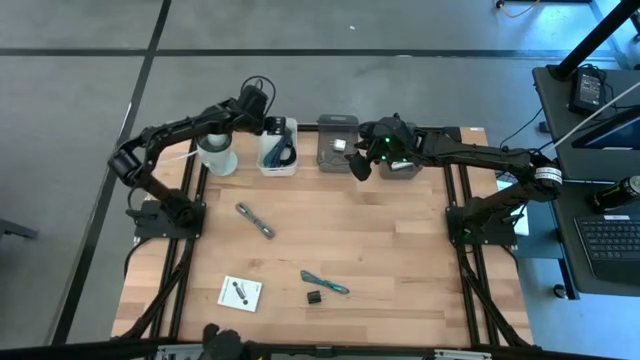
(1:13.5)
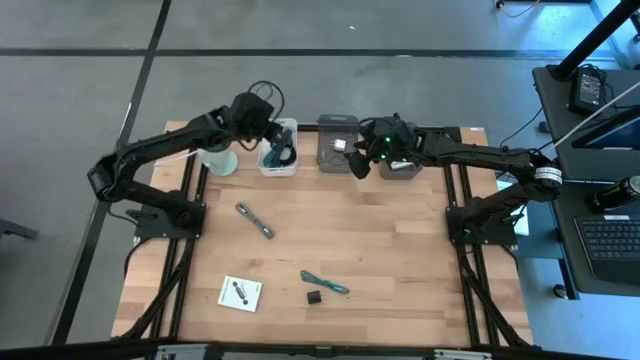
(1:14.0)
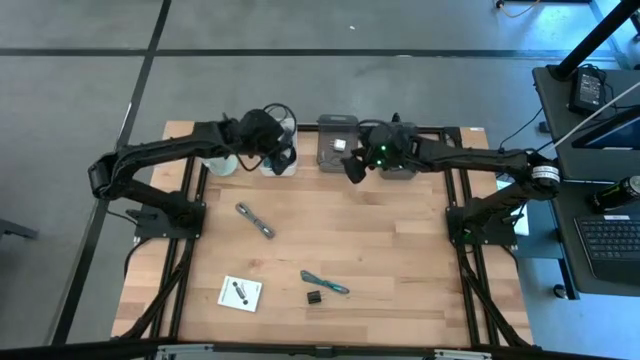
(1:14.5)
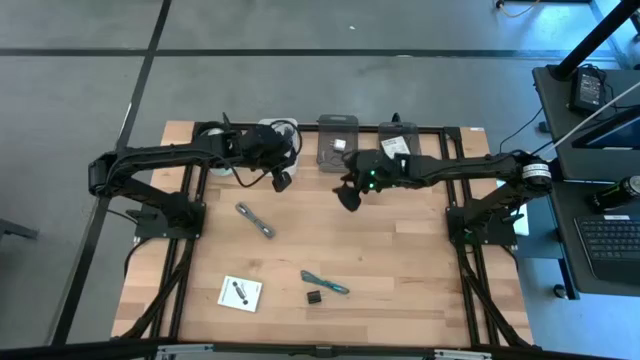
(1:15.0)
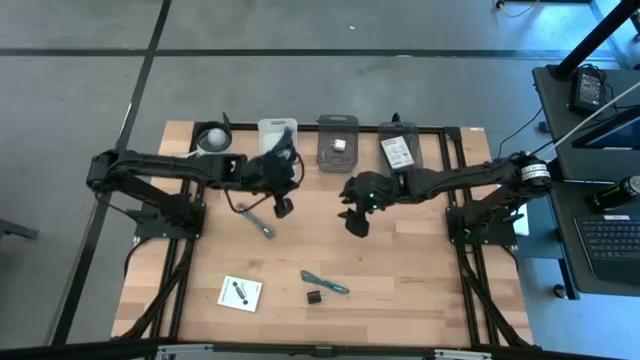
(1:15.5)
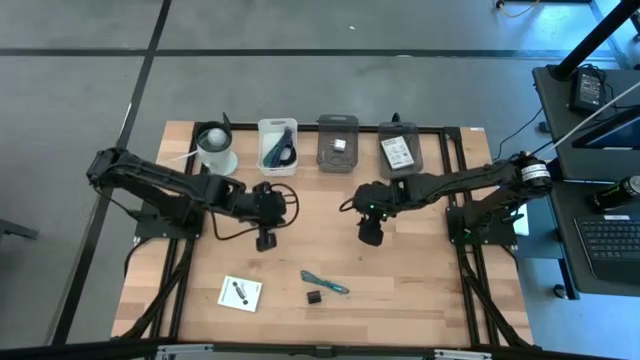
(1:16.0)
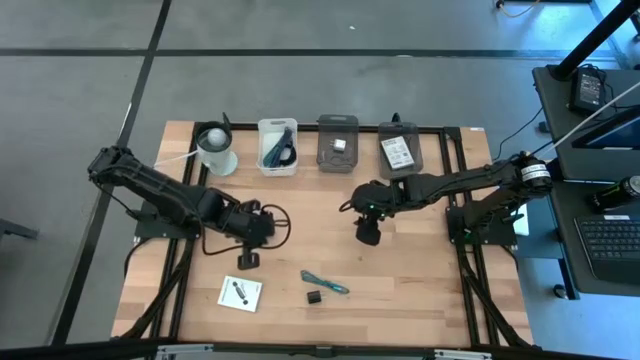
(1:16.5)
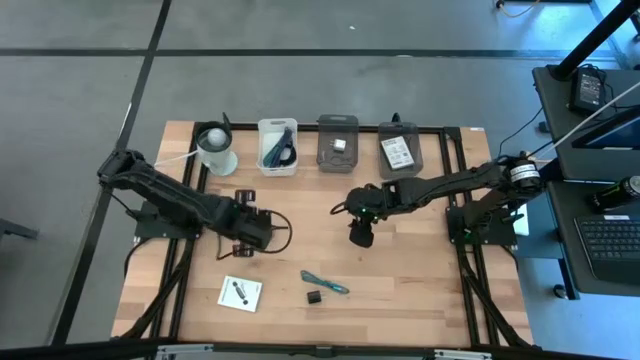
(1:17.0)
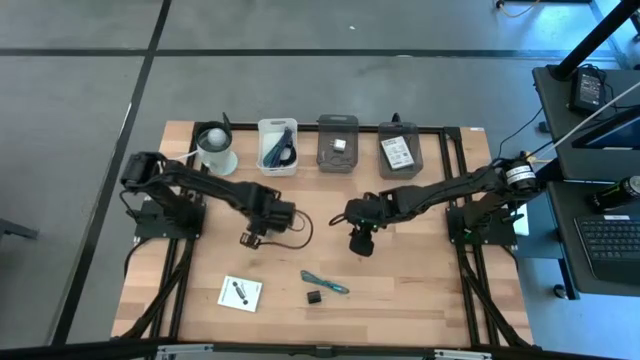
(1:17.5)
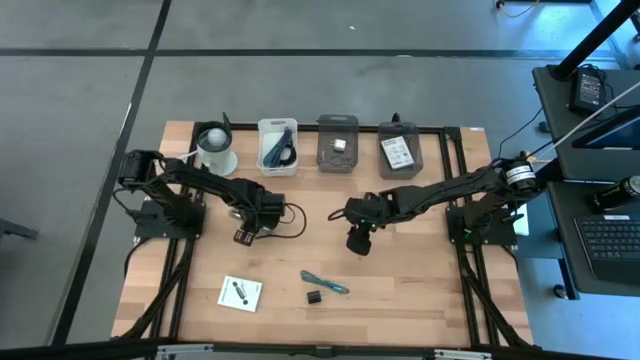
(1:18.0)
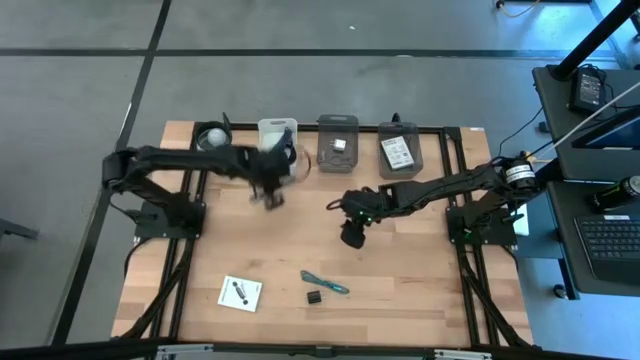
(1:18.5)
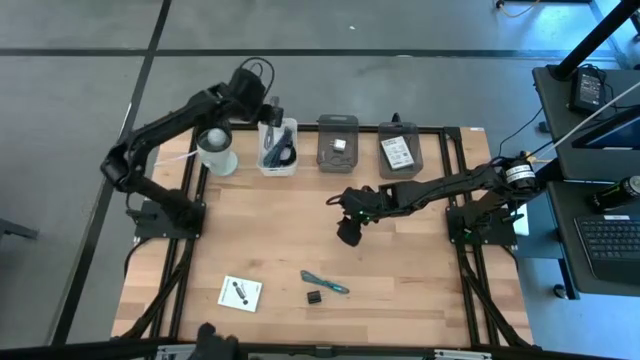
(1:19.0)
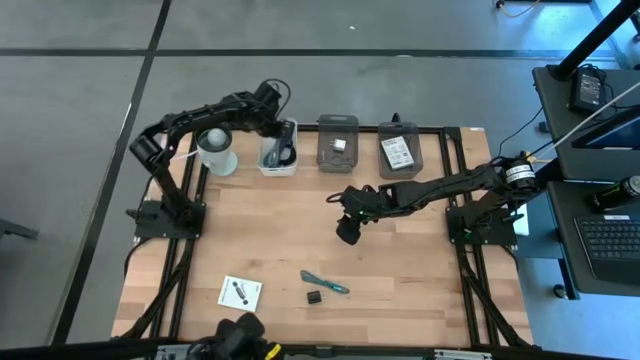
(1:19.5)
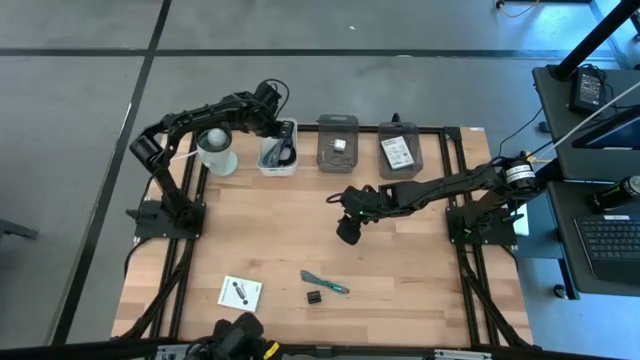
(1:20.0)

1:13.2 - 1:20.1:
Task: Pick and place items into bin
Put the white patterned charger cable into the white bin

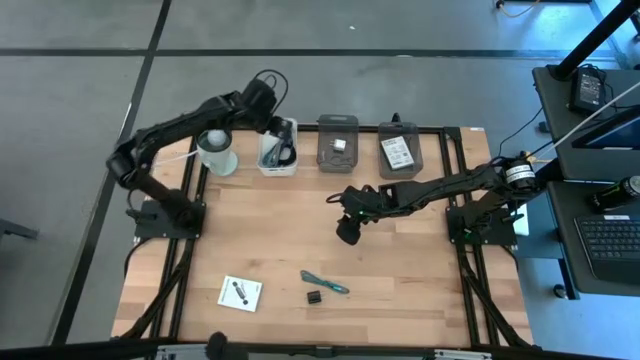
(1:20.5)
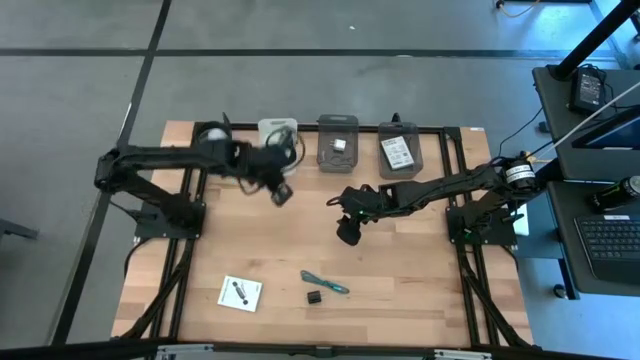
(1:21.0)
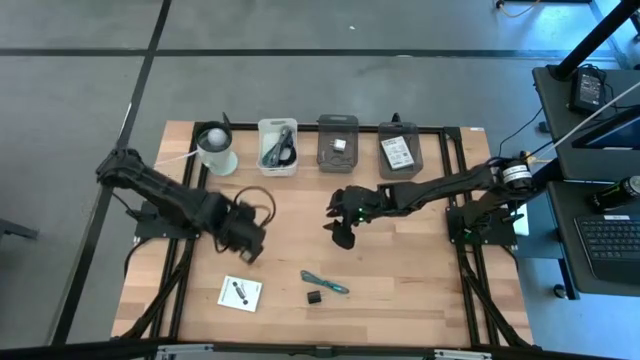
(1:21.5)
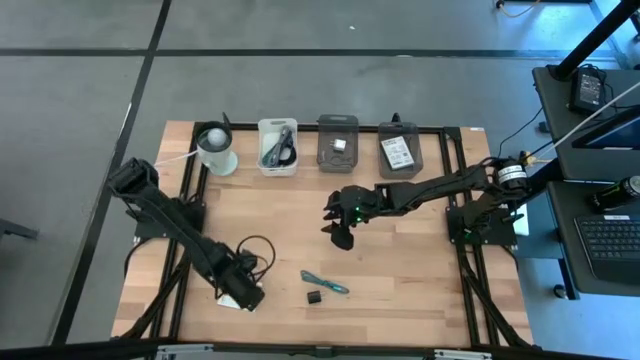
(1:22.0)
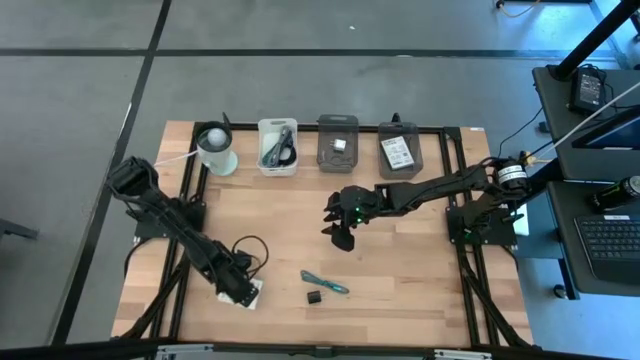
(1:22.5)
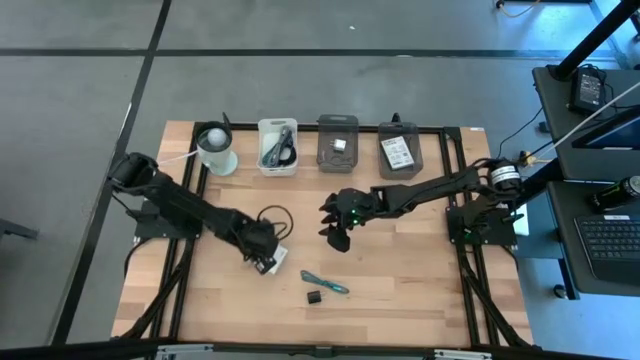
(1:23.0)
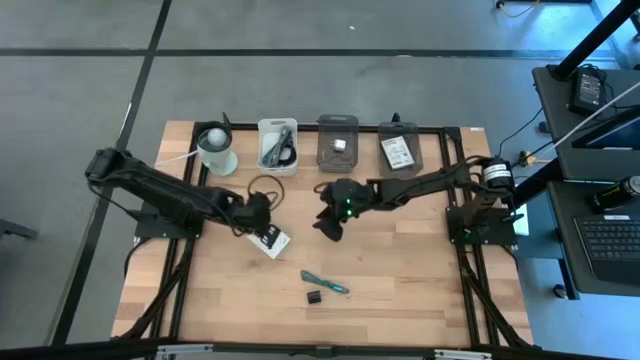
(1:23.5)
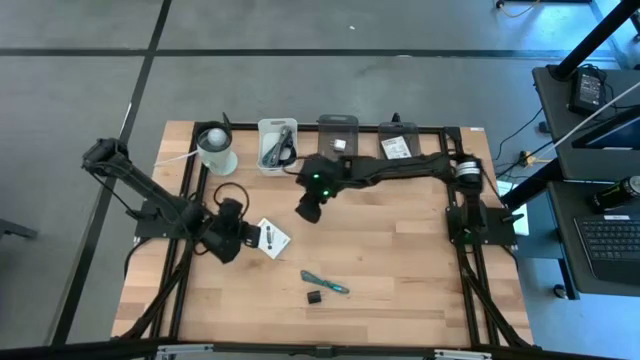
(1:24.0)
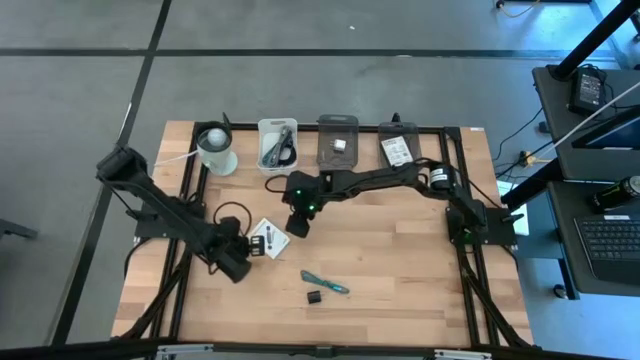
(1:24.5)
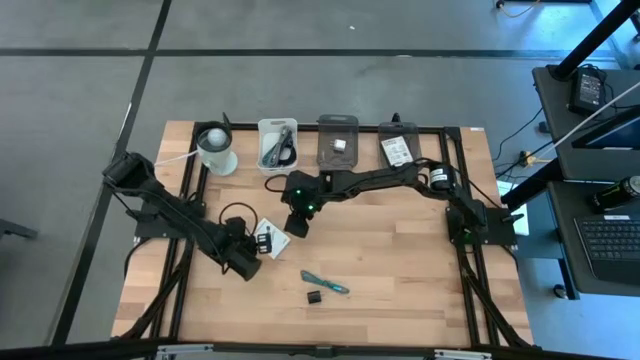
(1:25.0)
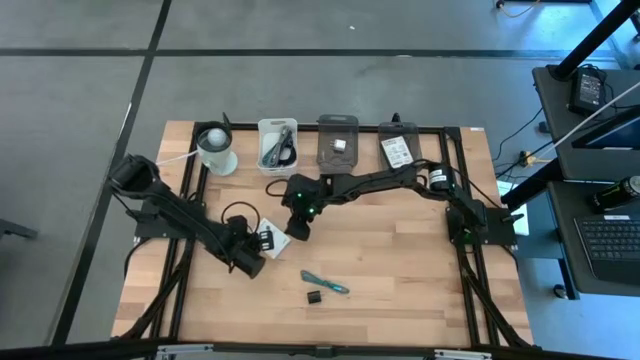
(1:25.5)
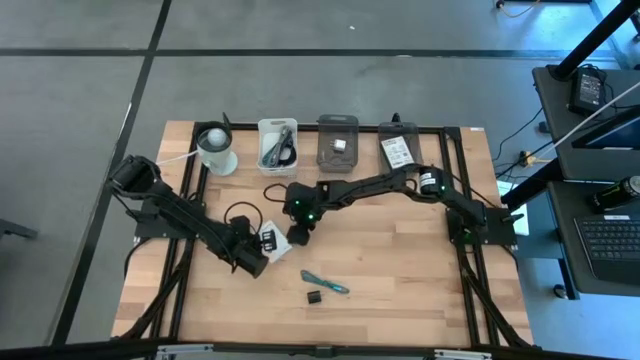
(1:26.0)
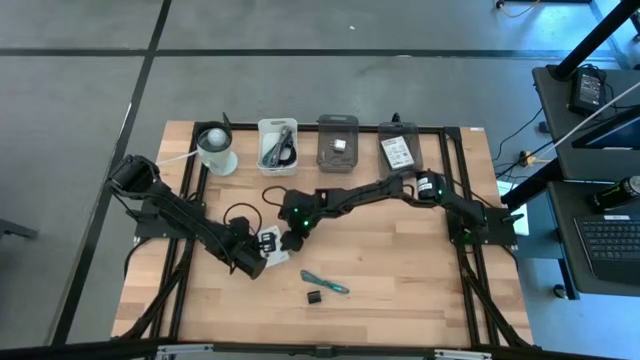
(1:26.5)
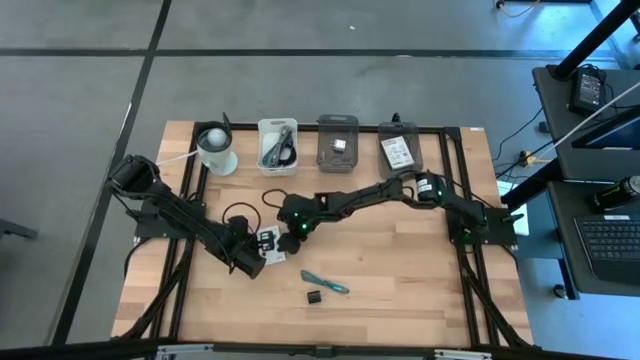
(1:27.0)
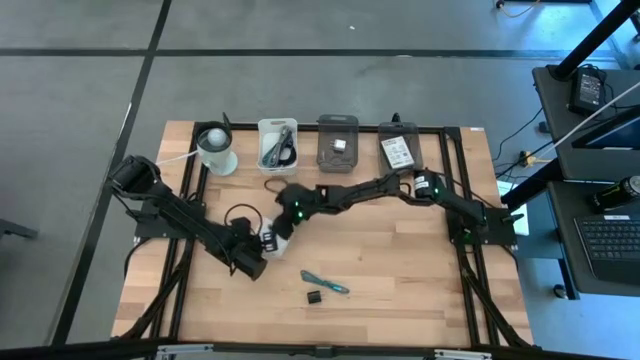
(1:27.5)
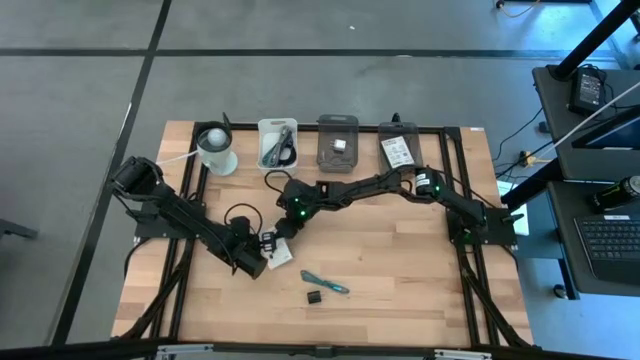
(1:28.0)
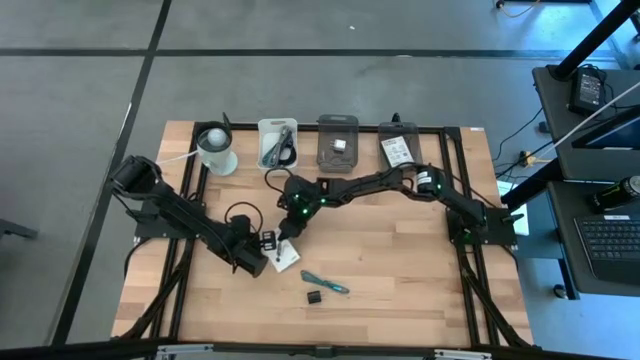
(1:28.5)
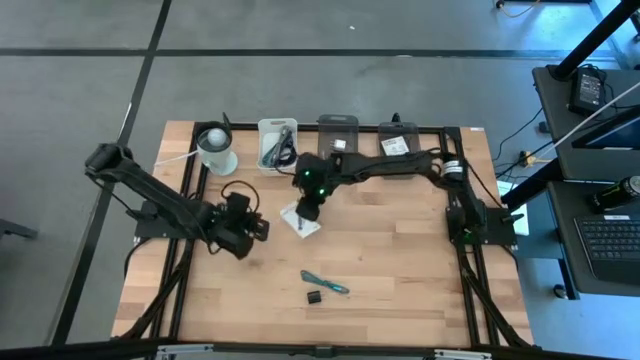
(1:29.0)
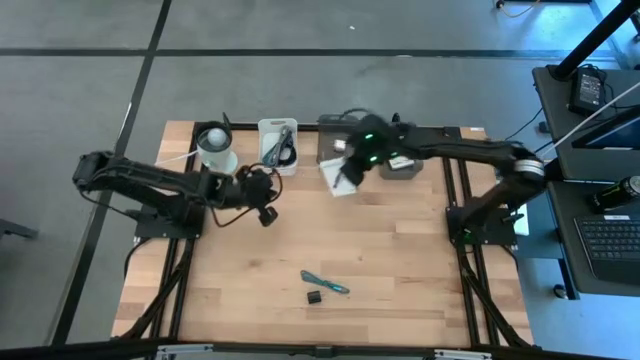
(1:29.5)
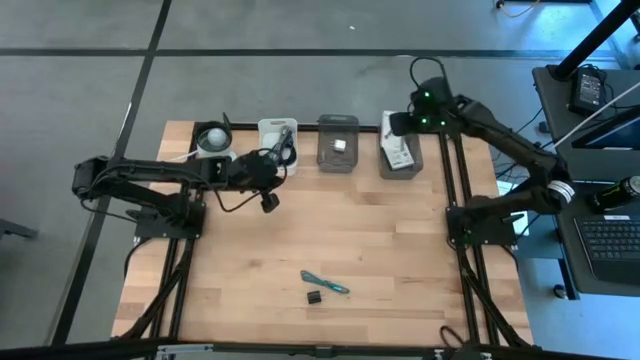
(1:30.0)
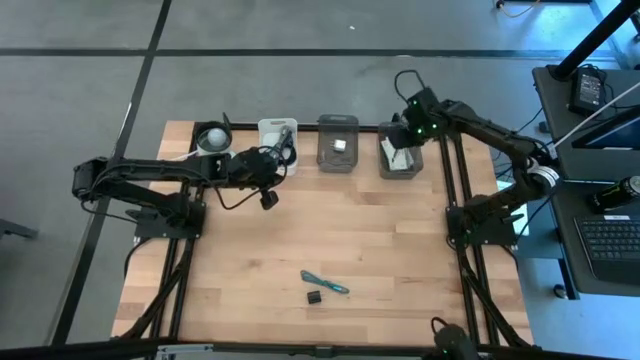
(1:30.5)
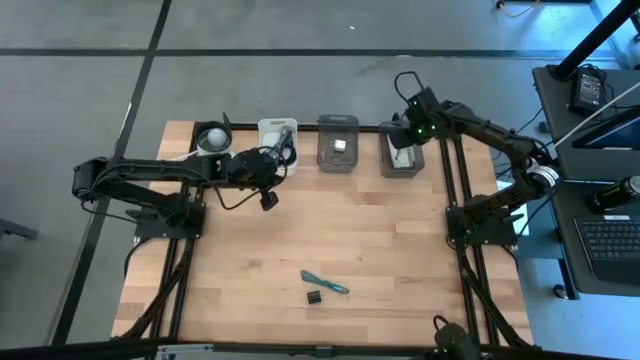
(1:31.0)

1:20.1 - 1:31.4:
Put the white card reader box into the right black box

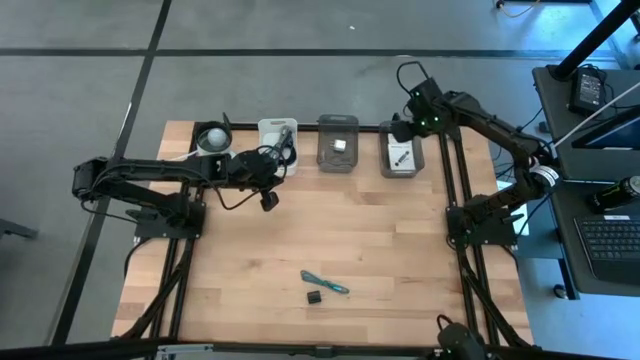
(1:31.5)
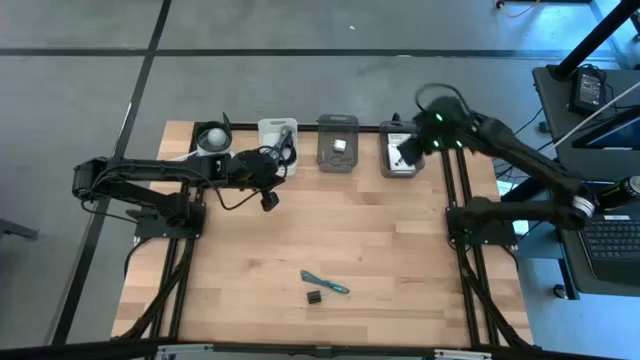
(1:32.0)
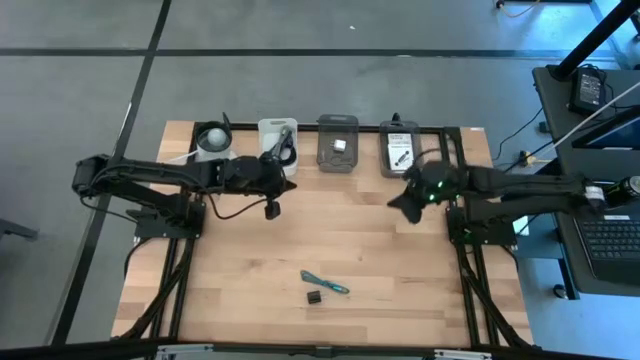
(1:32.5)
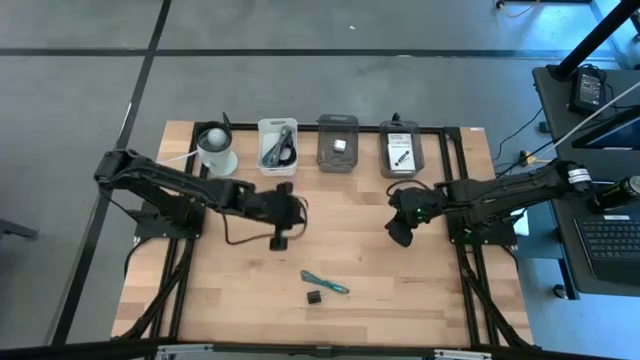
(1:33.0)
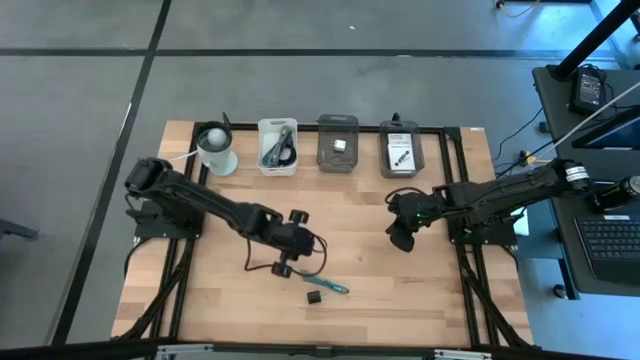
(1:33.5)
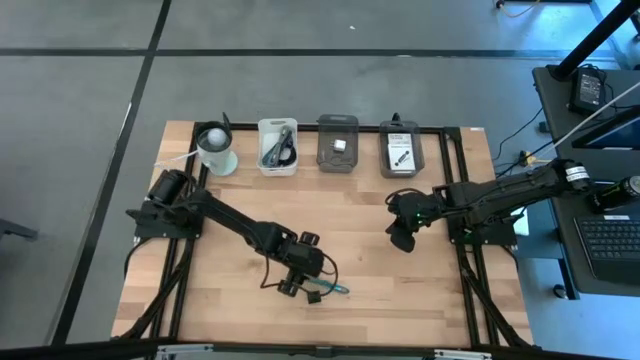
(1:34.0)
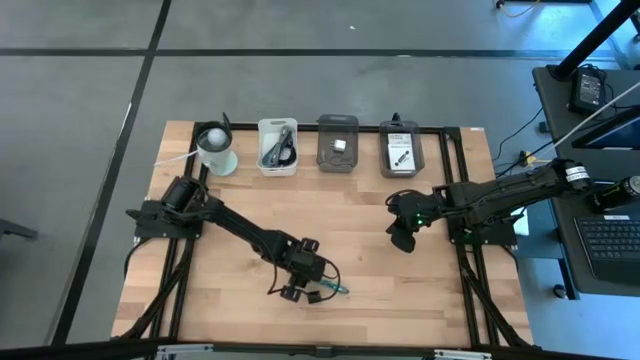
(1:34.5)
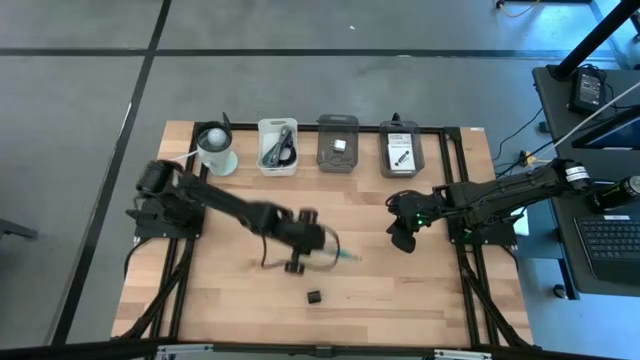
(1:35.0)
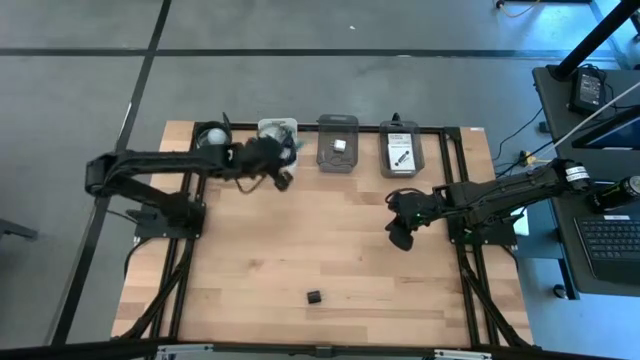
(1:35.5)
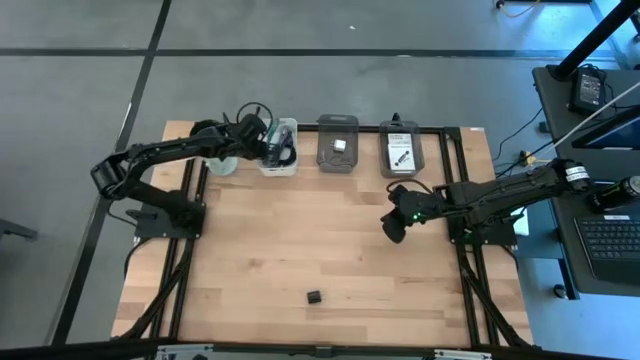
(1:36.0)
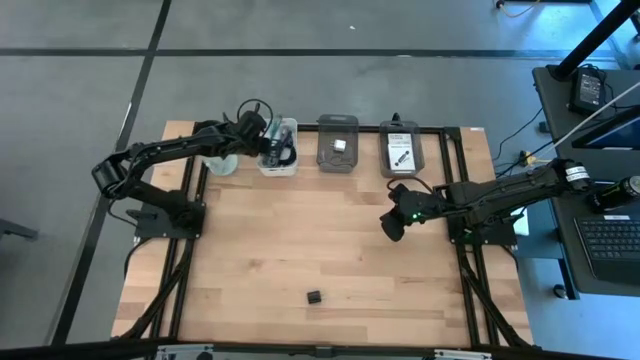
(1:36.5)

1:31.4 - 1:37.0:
Put the blue patterned charger cable into the white bin
